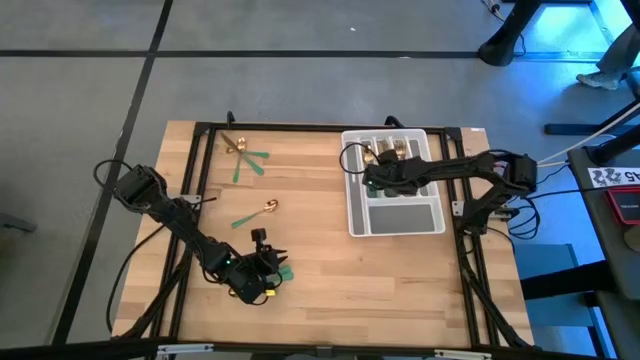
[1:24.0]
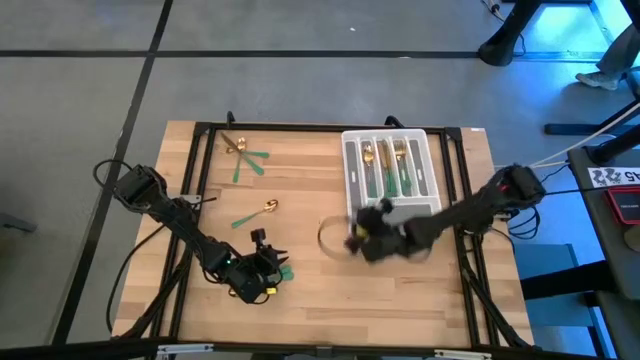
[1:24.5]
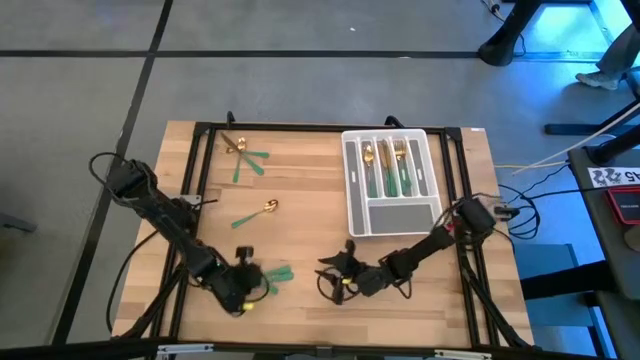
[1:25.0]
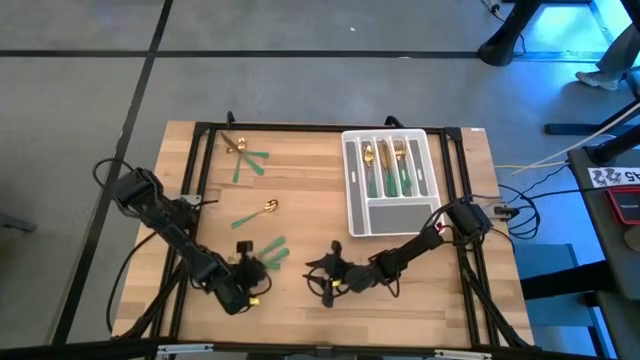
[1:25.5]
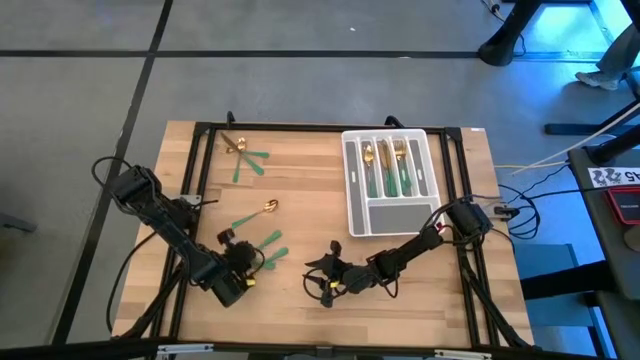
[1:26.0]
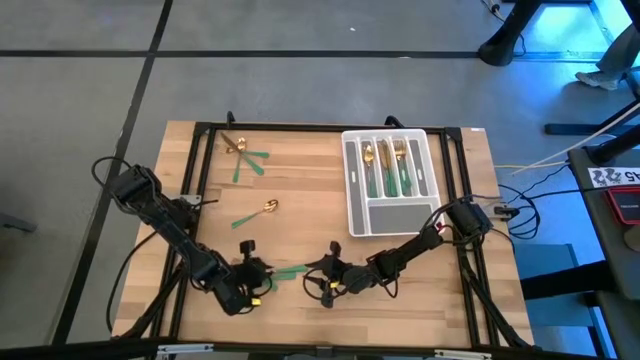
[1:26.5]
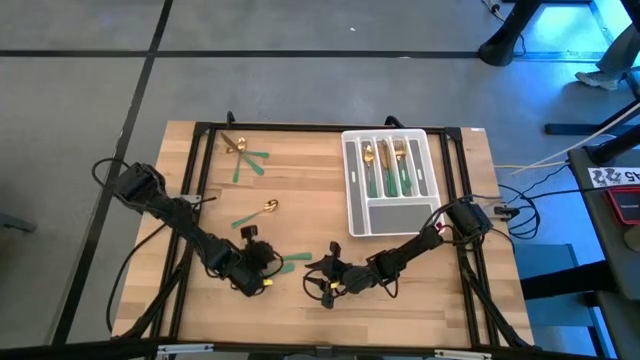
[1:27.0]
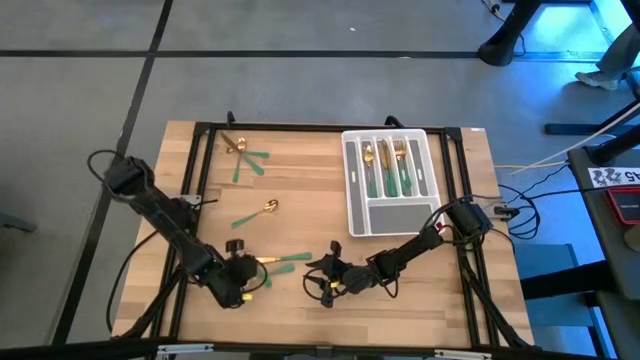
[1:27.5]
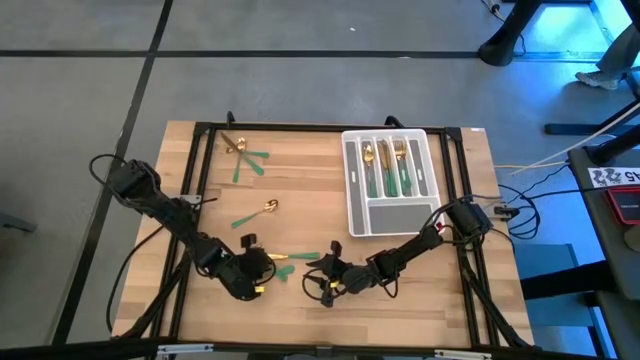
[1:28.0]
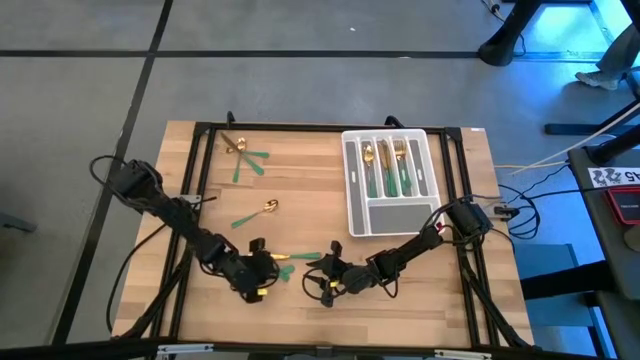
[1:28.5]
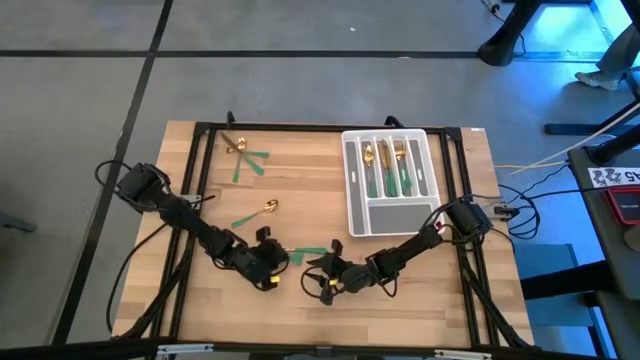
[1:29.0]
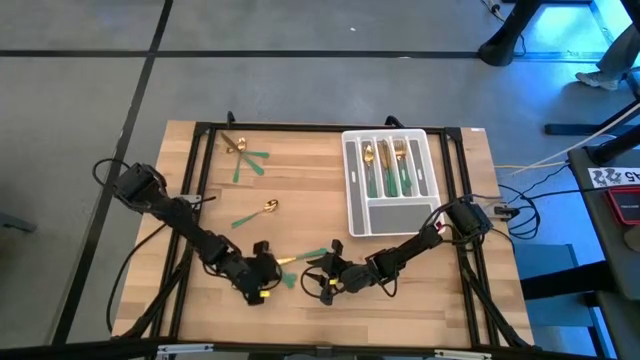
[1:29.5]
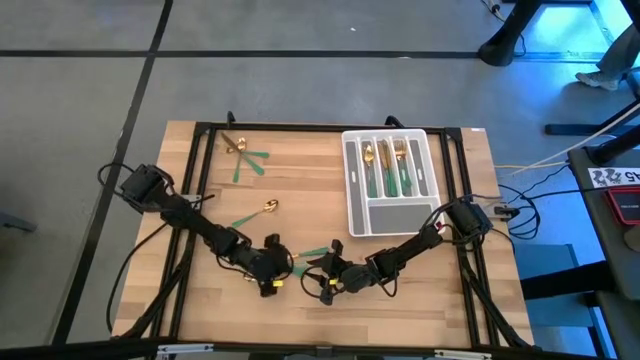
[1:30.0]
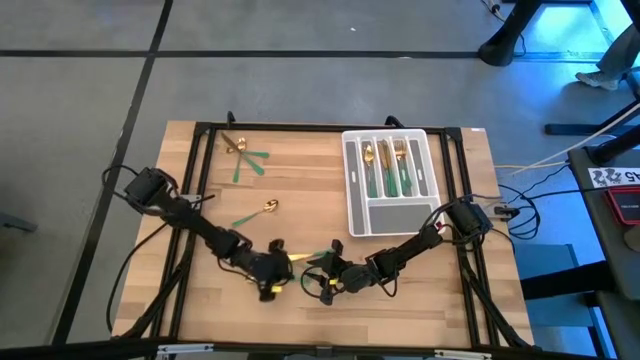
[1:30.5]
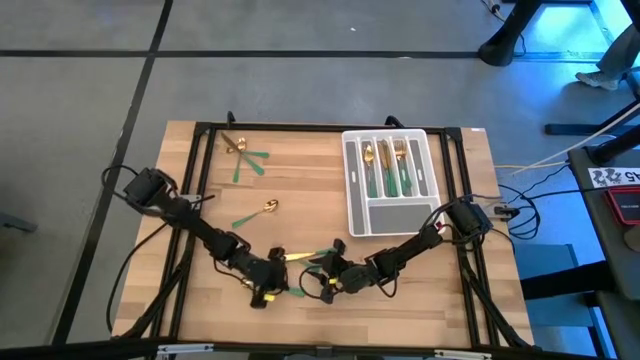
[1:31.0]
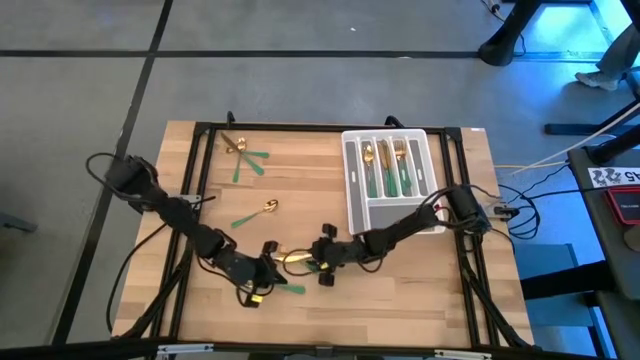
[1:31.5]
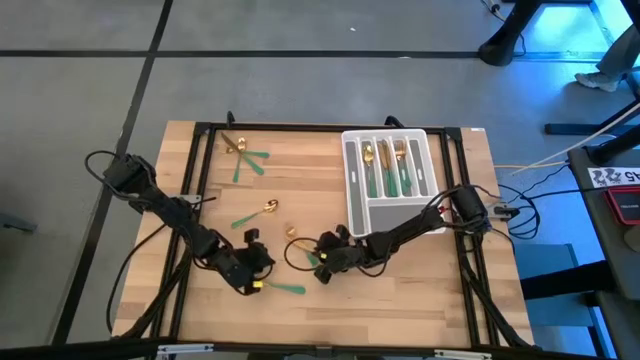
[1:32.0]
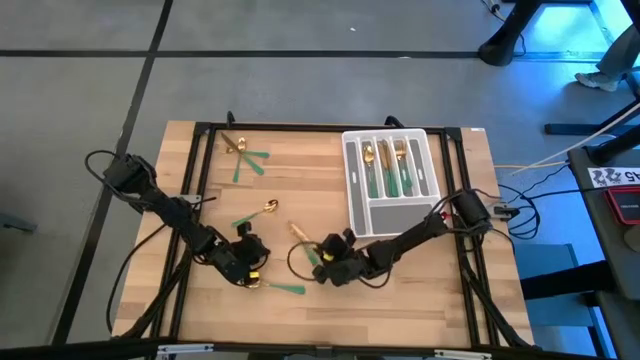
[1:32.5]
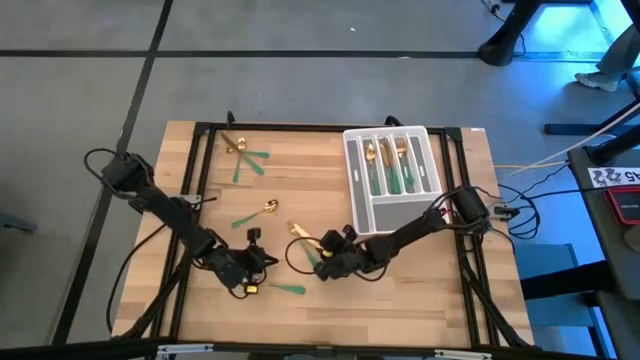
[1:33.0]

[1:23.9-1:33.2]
Task: Sort silverware
Put the green knife into the silverware tray

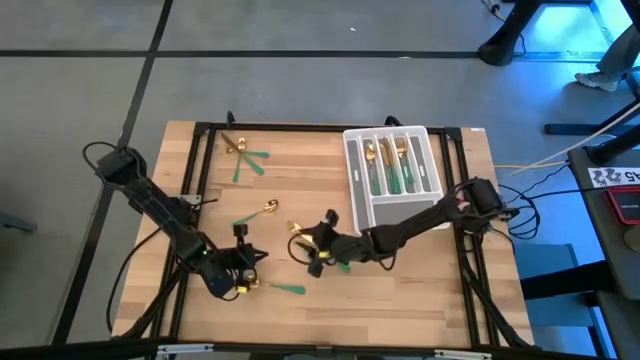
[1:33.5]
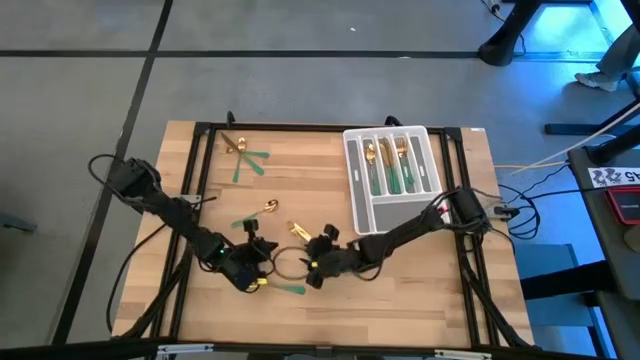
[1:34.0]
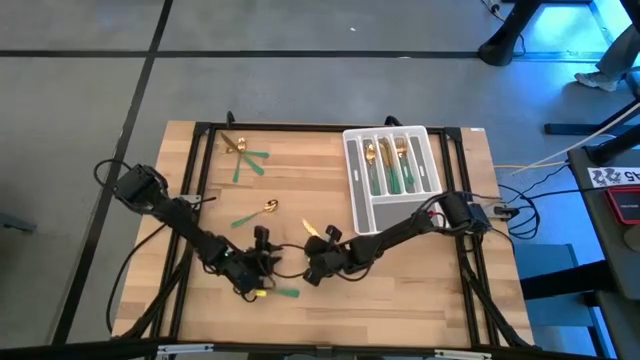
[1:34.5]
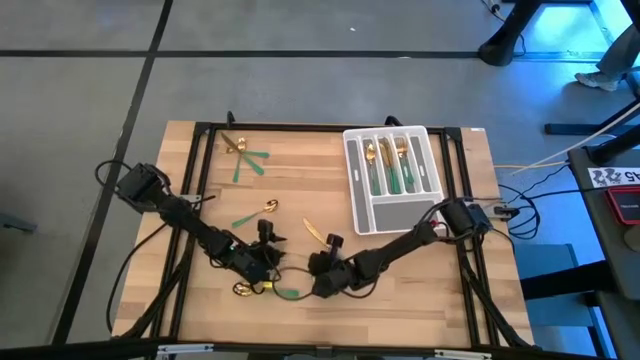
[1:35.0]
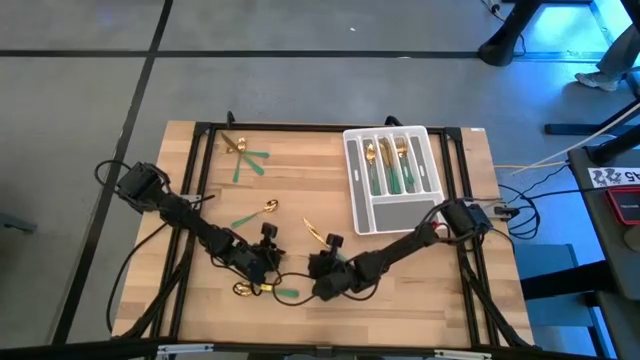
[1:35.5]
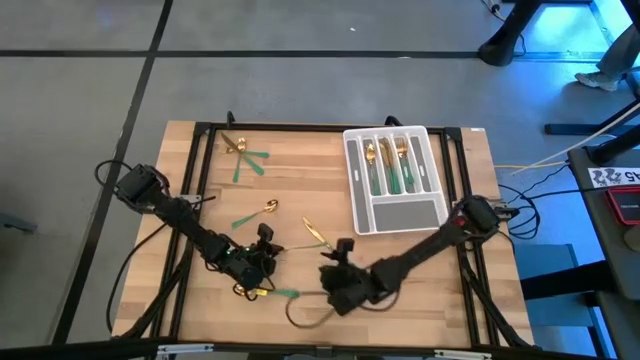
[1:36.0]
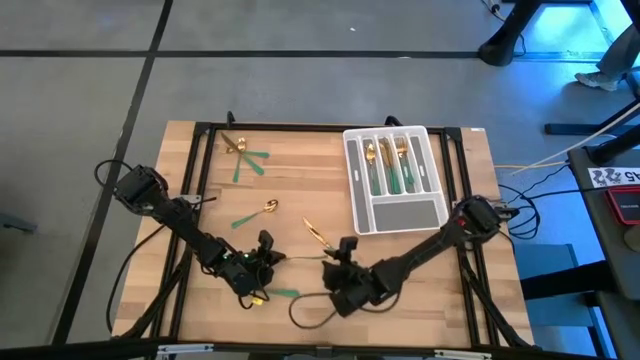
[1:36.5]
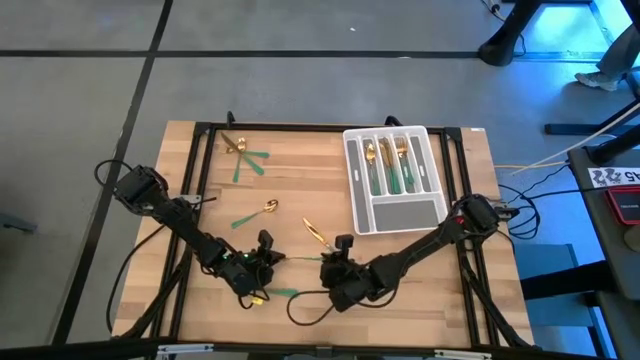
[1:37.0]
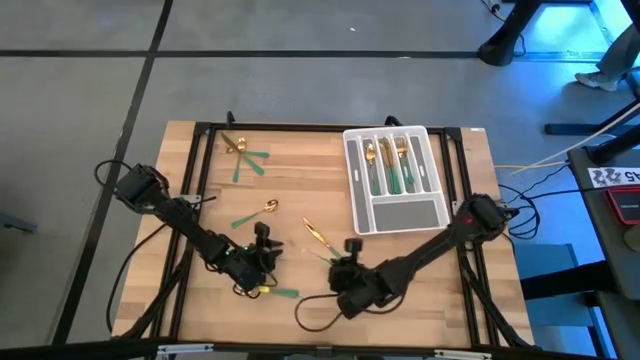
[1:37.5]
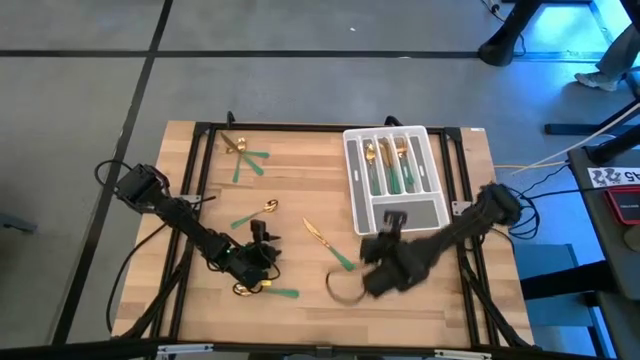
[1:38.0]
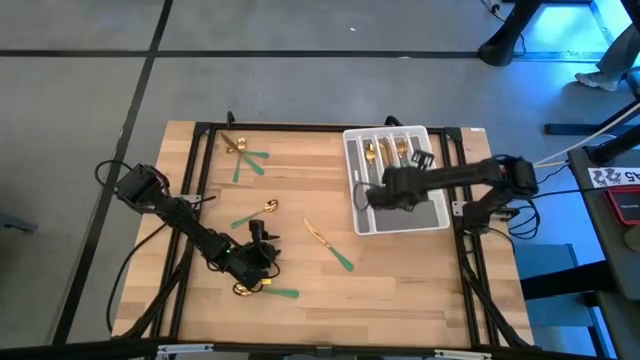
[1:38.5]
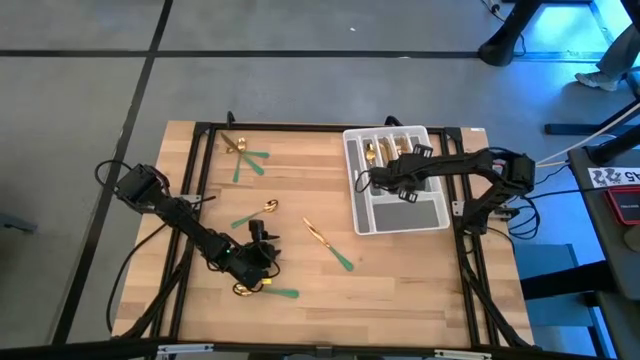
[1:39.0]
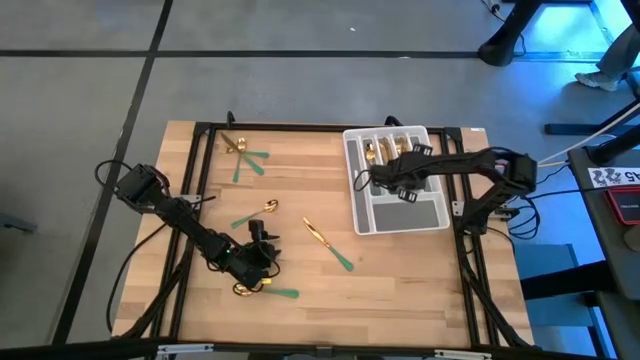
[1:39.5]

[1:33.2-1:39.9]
Put the green fork into the silverware tray

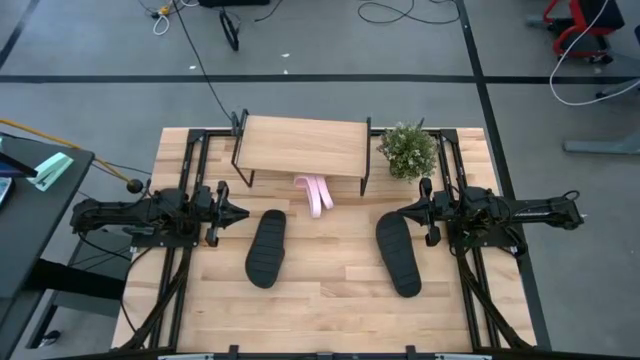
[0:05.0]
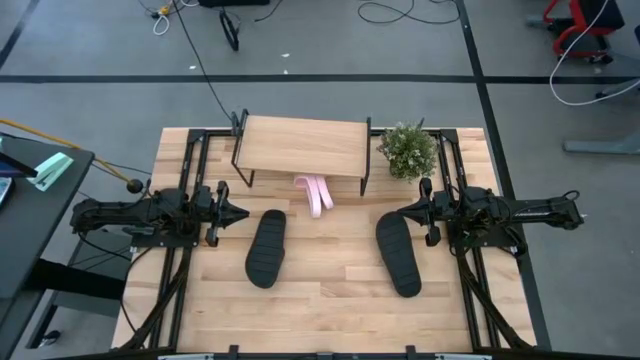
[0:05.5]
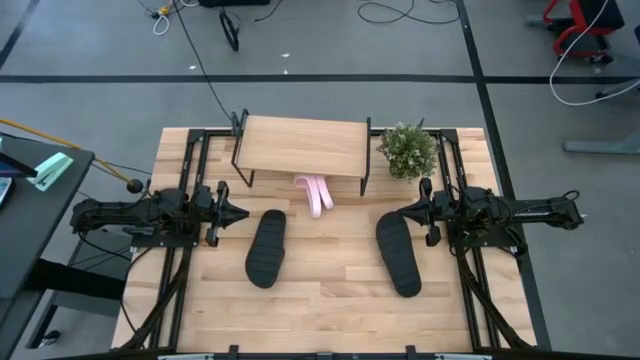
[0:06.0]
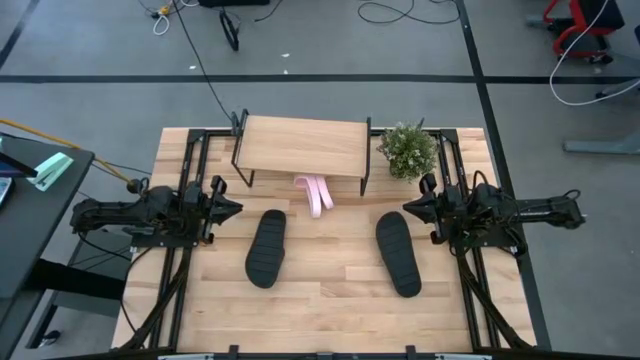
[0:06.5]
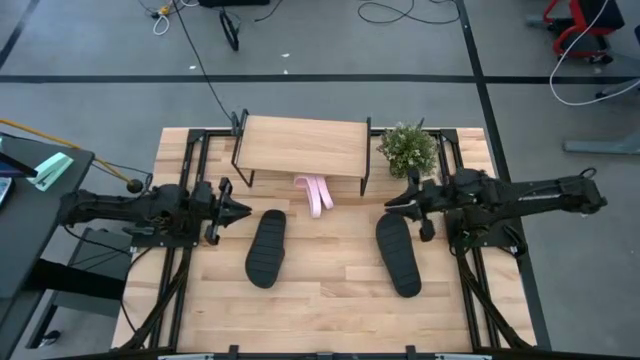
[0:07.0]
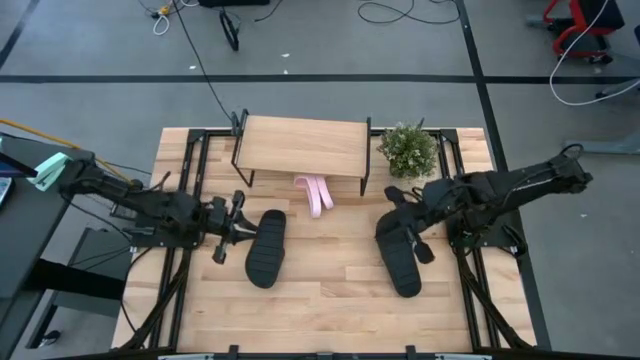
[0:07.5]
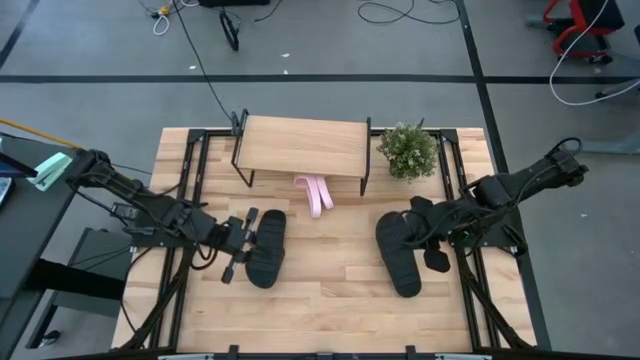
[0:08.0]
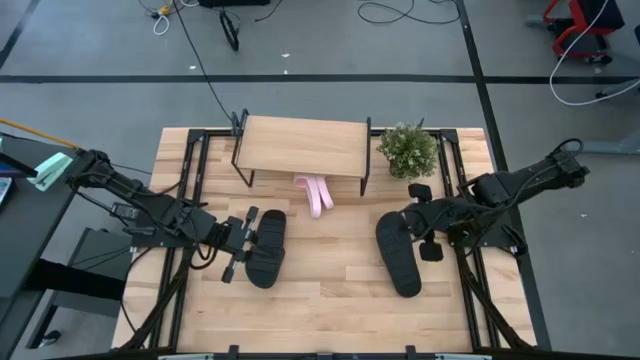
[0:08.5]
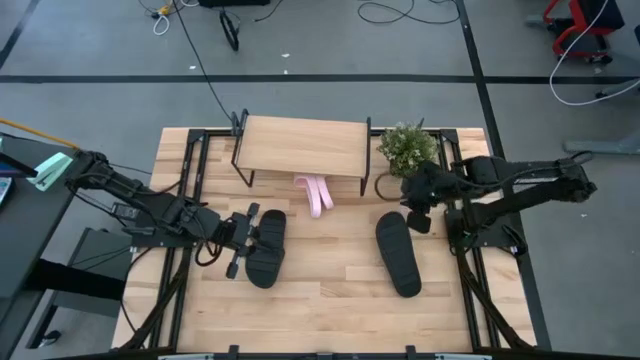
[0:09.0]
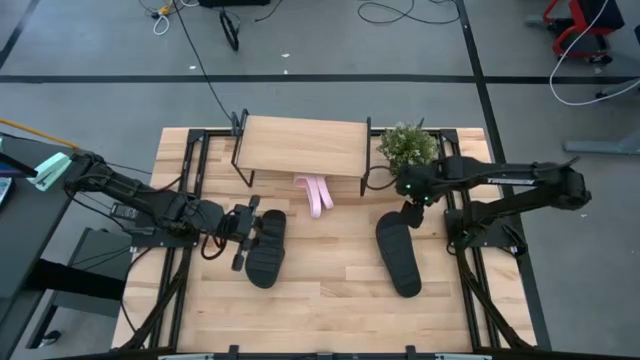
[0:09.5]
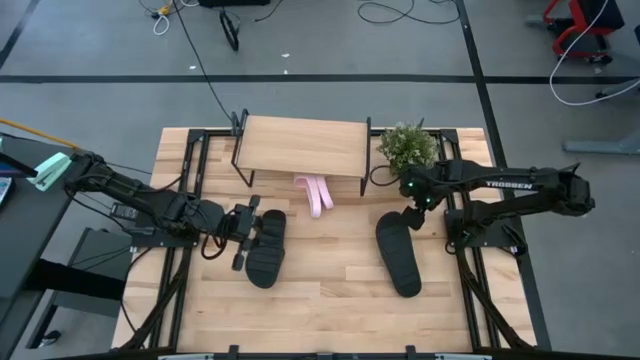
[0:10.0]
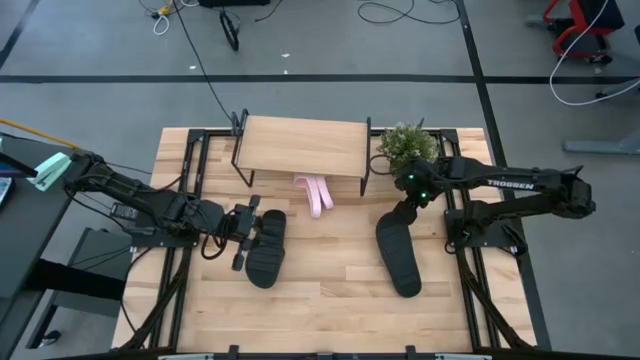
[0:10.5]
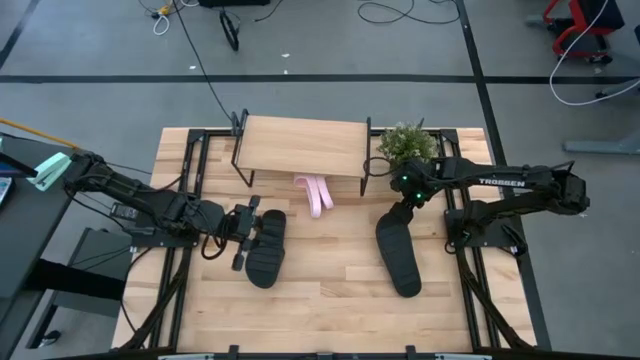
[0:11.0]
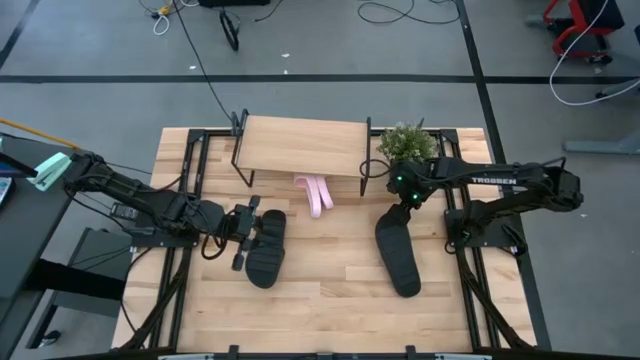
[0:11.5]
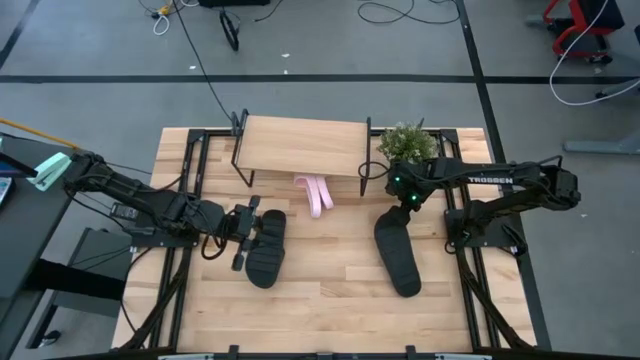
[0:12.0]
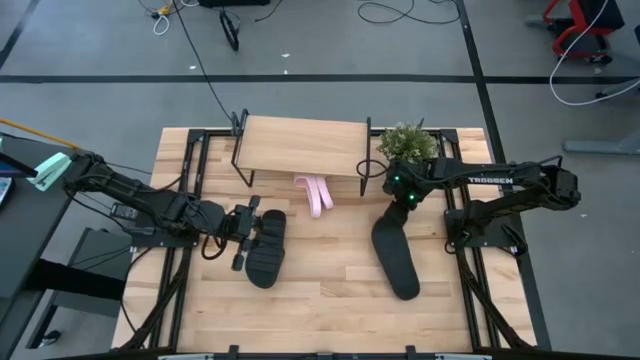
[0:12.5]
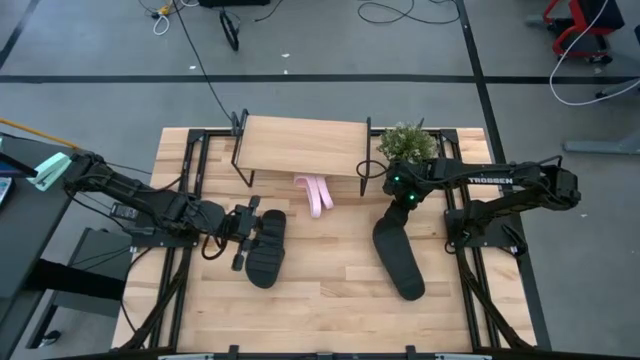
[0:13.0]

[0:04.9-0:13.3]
Task: Pick and place slides into the shelf
Put the right black slide on the shelf
